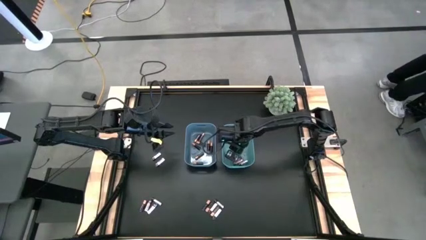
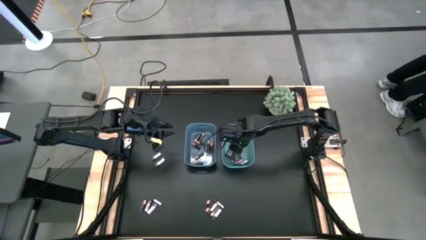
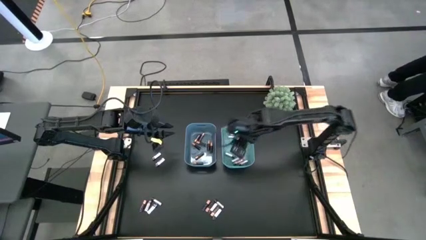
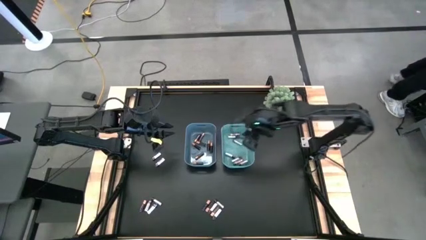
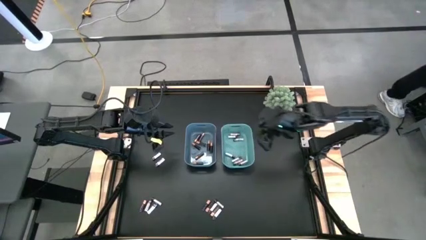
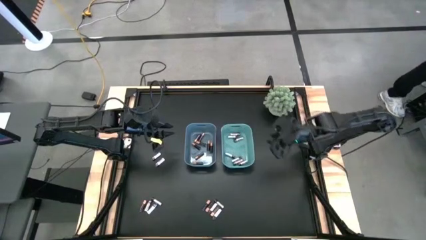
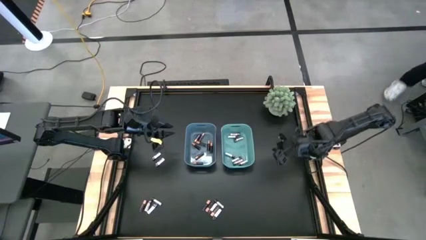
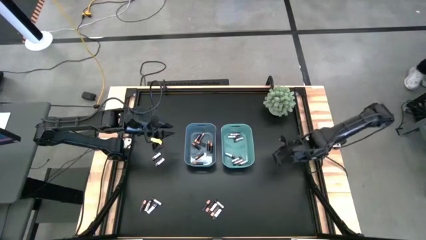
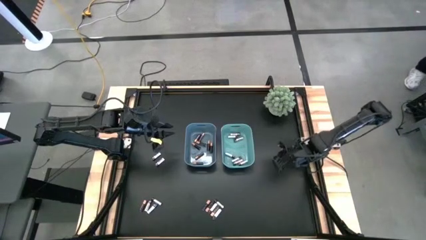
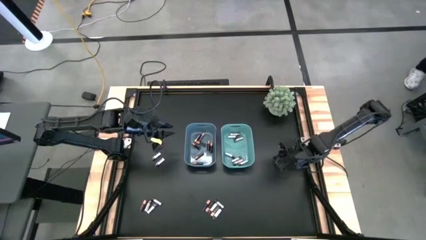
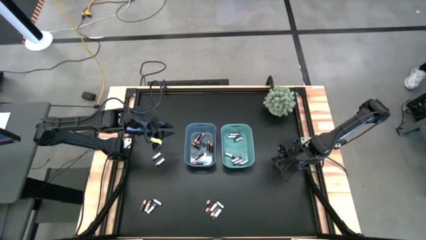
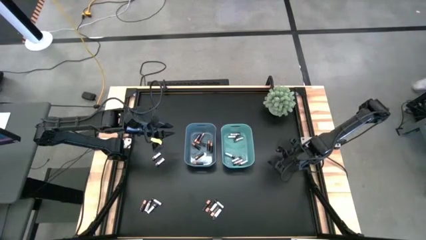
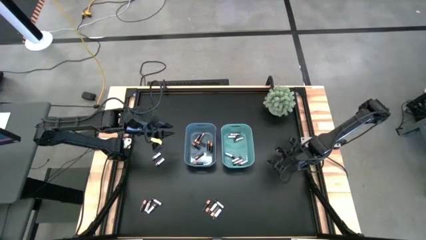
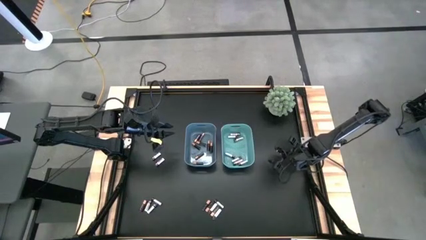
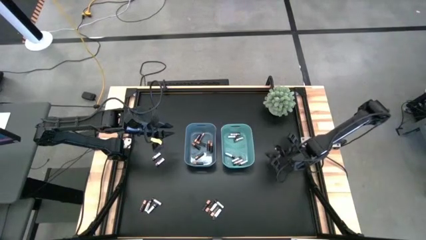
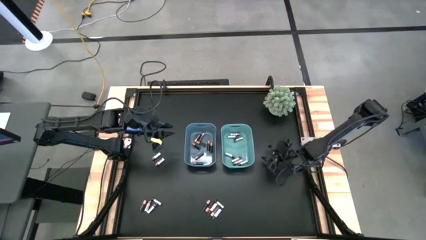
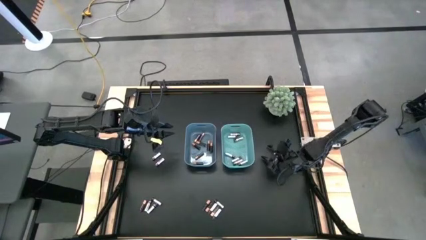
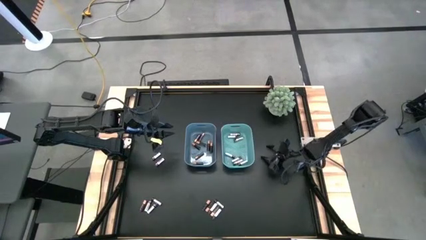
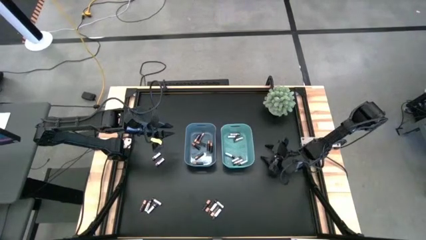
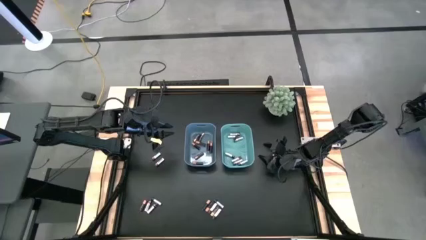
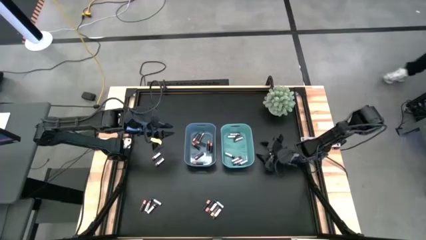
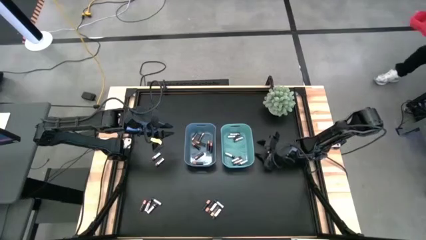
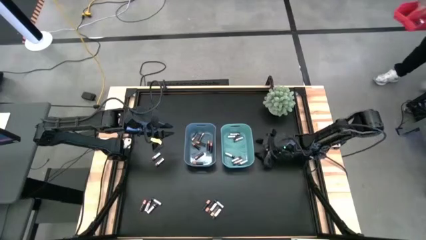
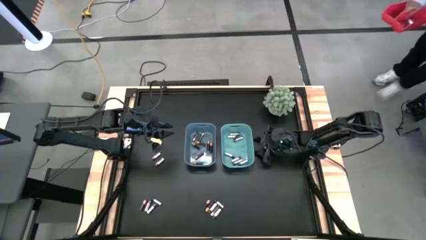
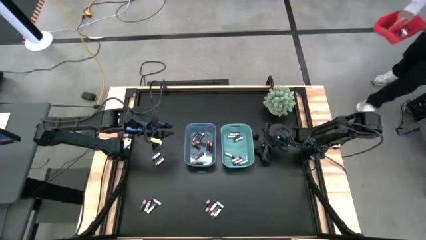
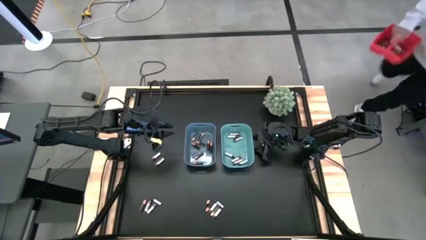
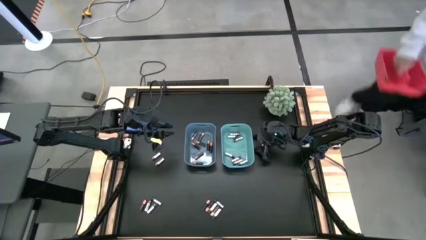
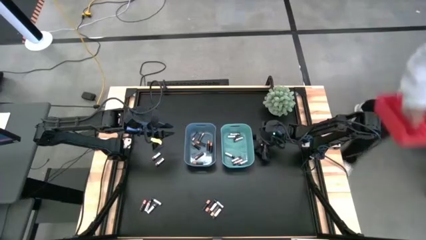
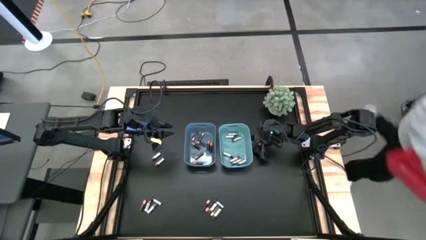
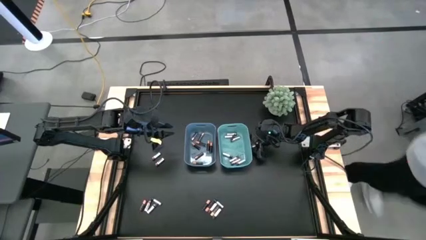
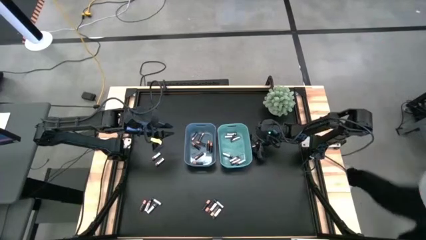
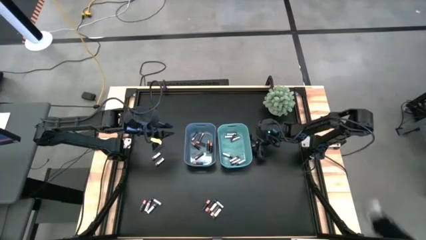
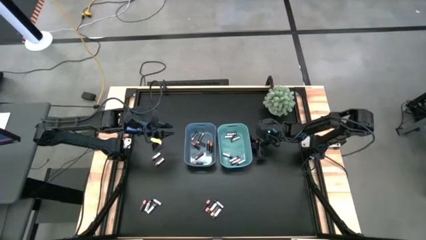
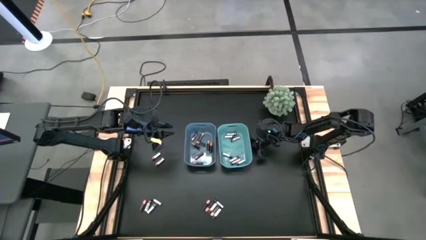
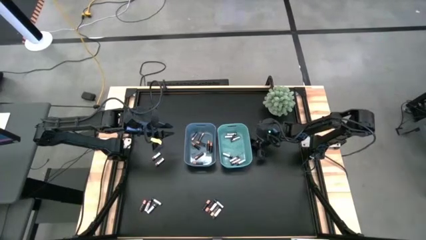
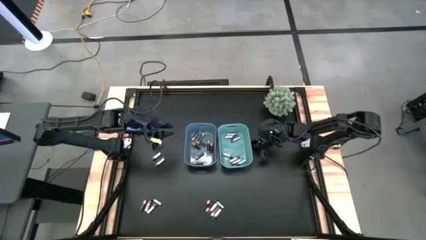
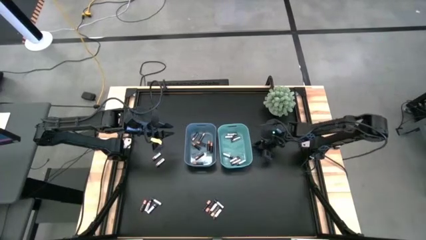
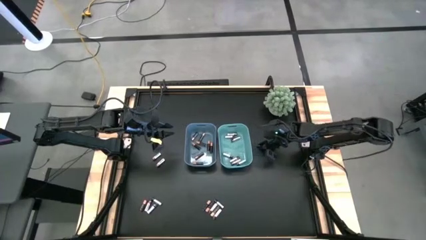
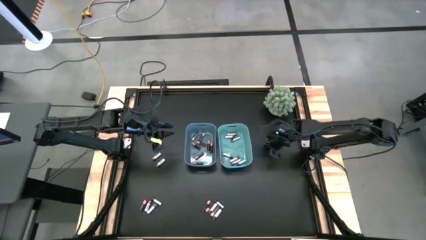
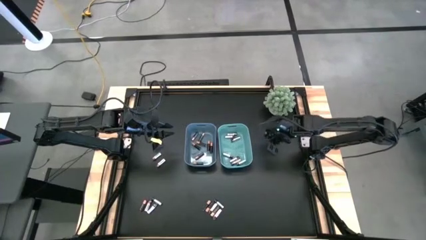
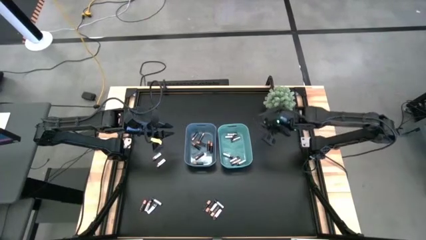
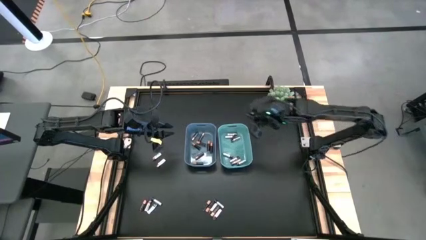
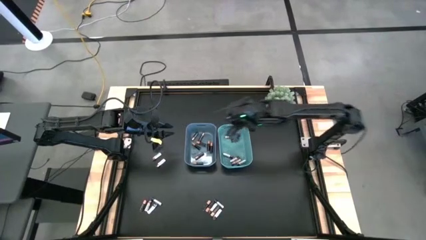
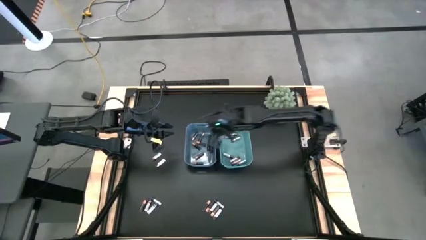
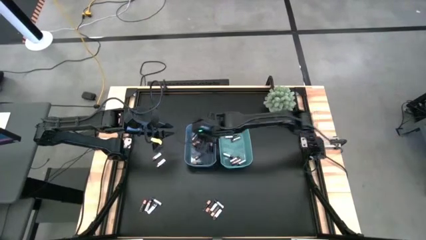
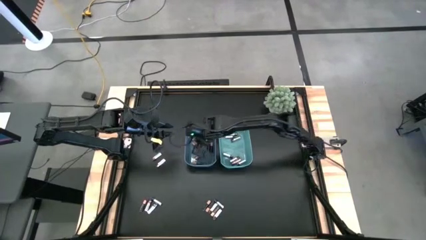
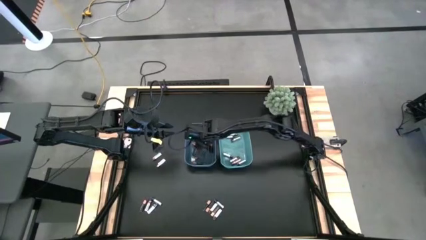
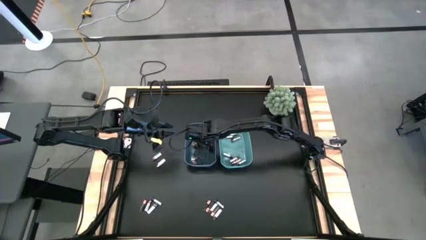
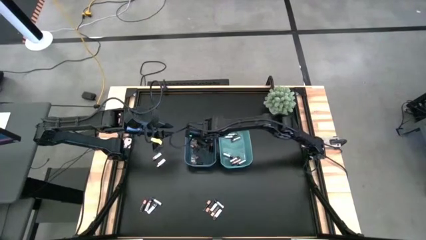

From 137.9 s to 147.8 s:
Task: Sort batteries
Put the black battery into the blue bin

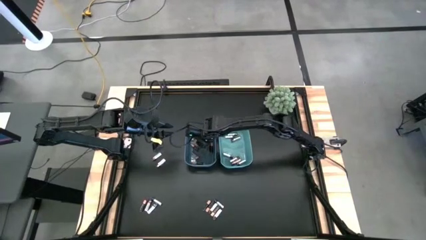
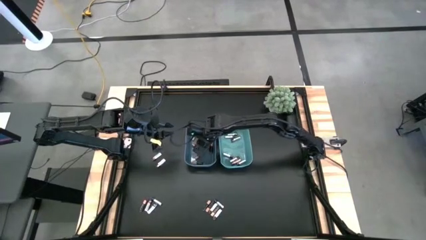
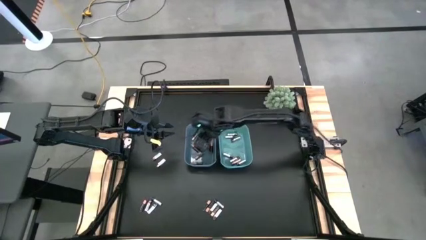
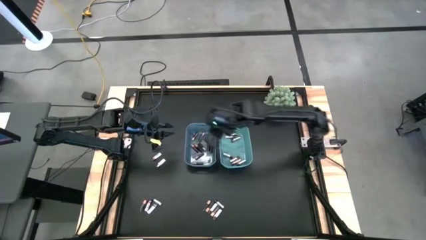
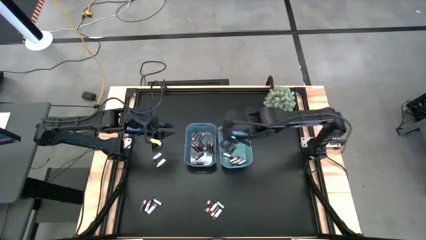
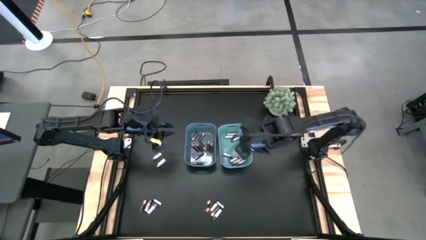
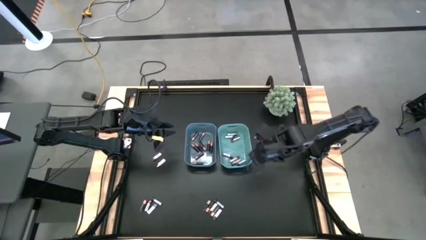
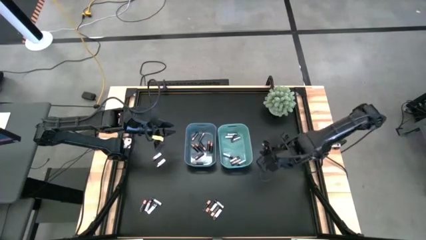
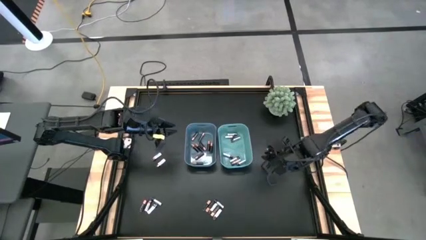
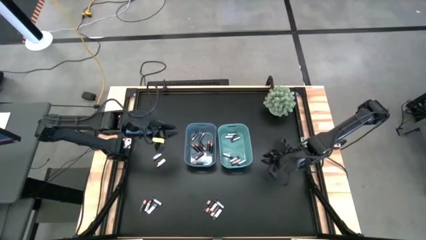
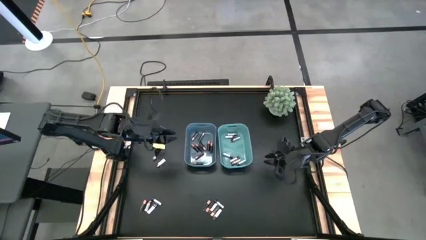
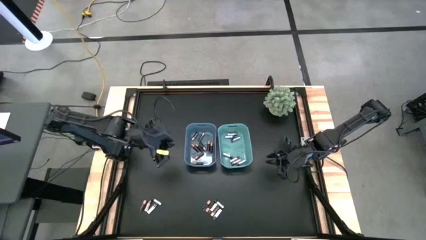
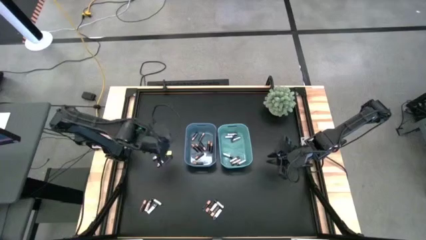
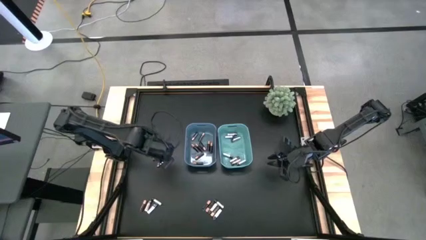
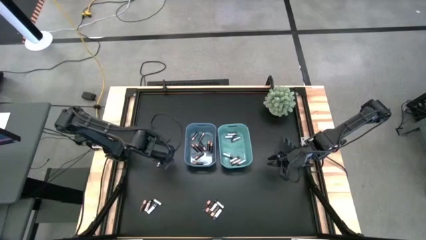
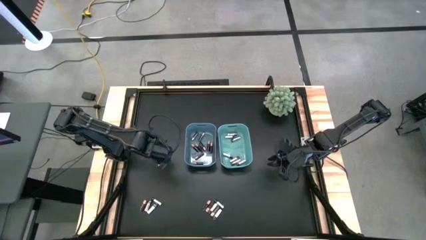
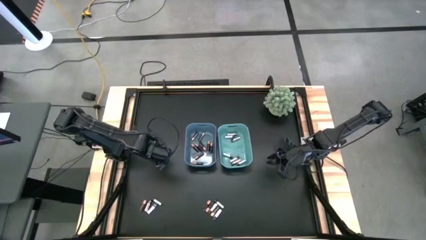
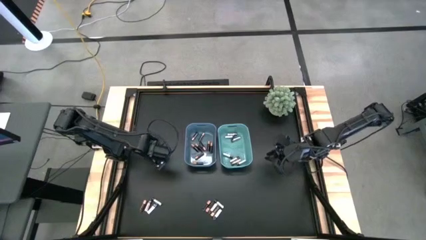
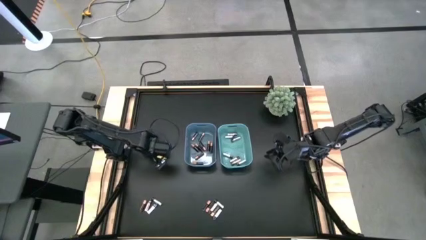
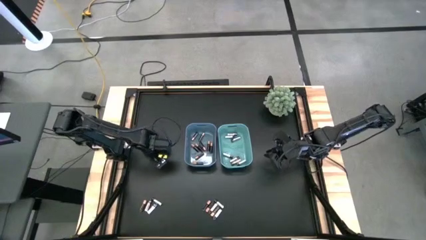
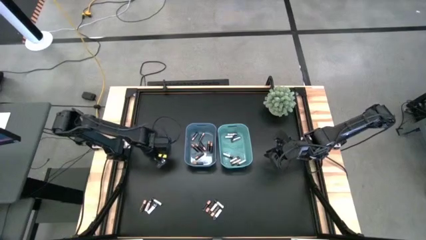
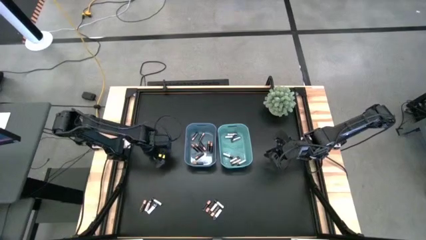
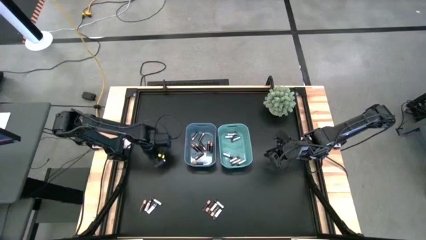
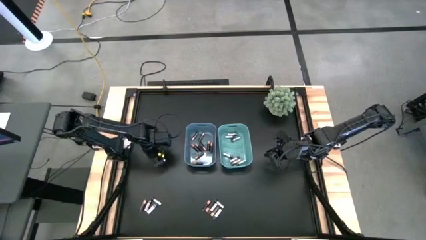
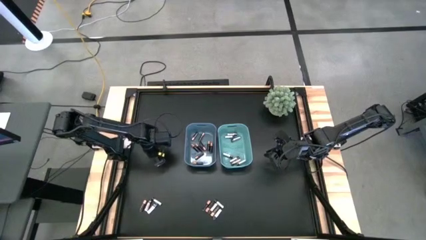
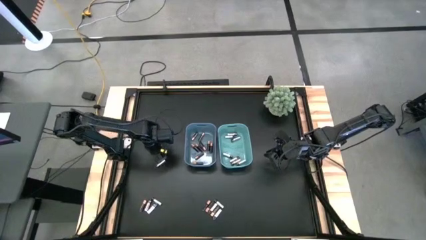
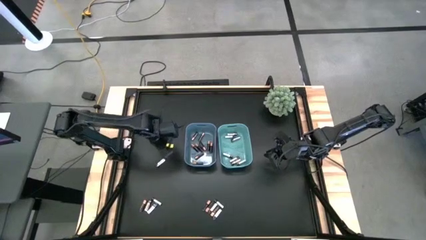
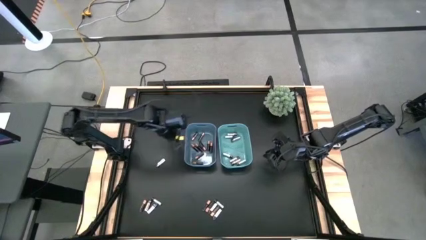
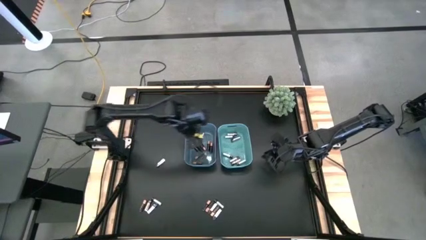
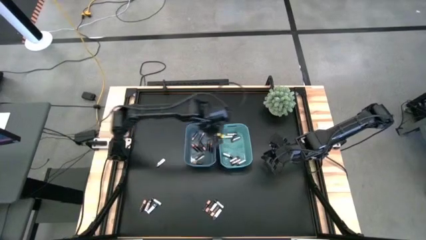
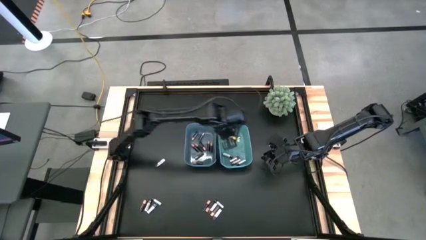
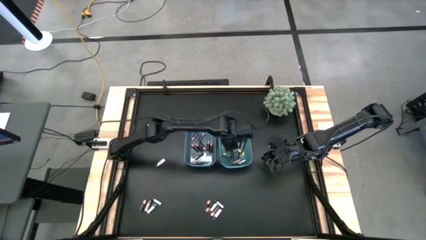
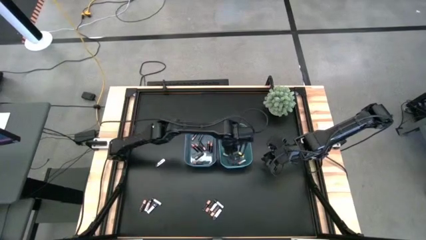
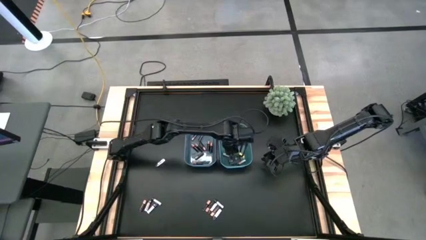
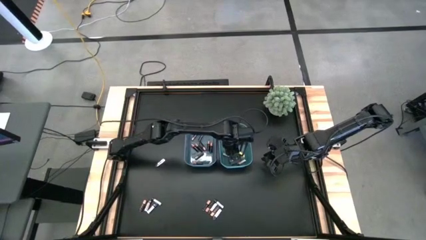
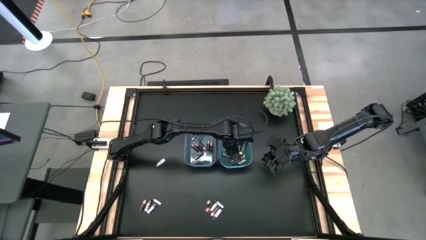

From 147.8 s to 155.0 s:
Put the white battery into the green bin
